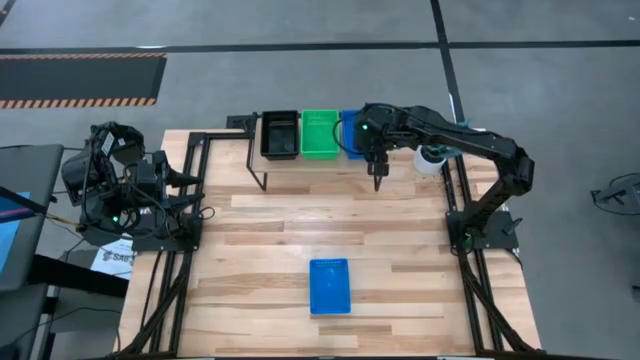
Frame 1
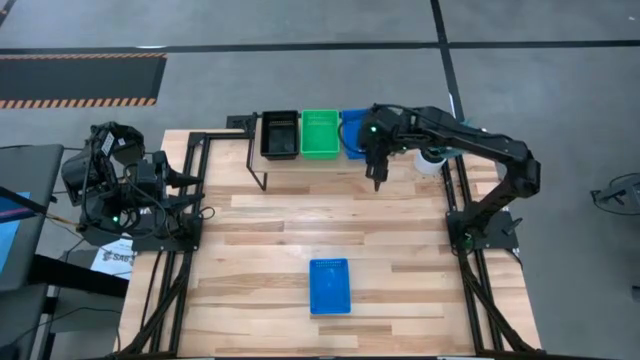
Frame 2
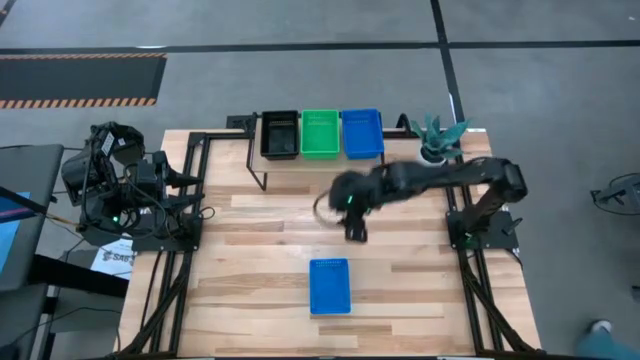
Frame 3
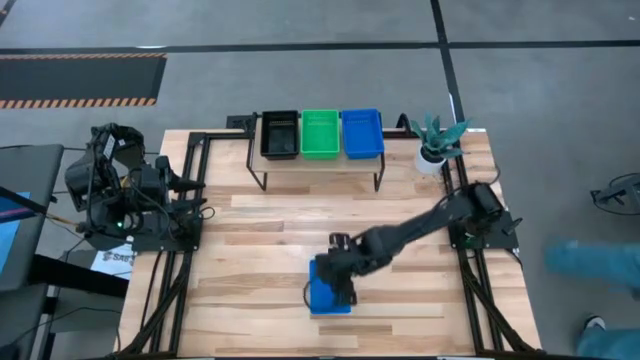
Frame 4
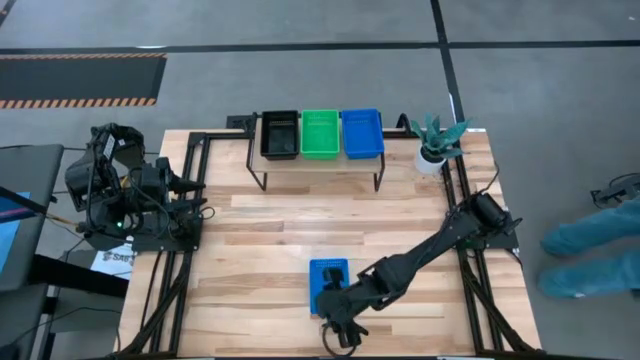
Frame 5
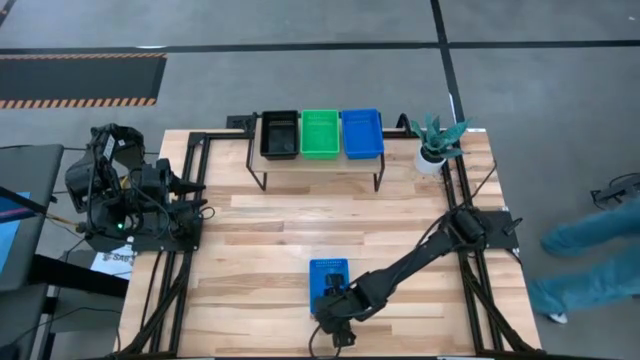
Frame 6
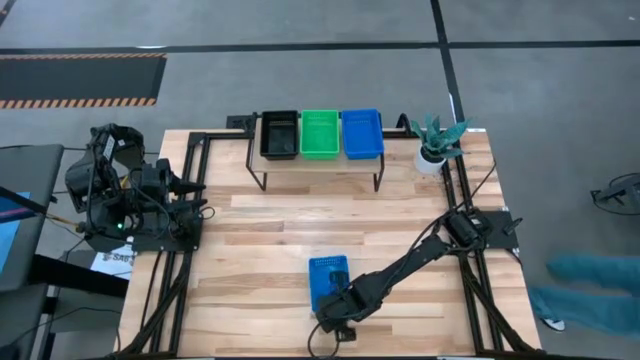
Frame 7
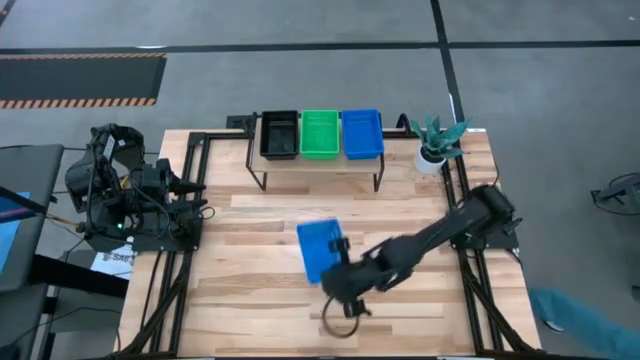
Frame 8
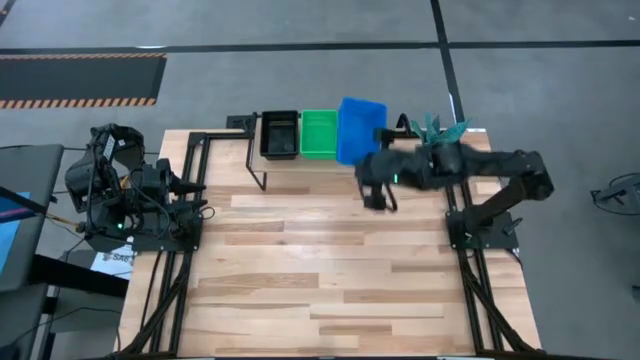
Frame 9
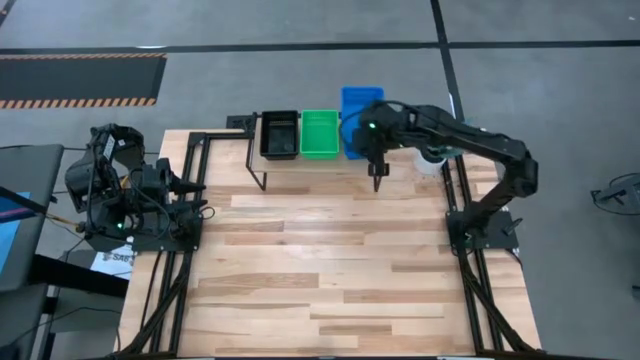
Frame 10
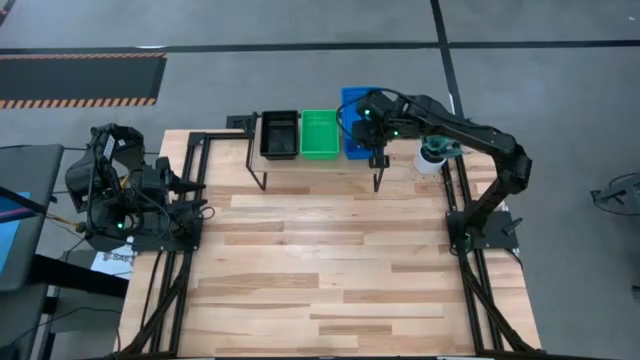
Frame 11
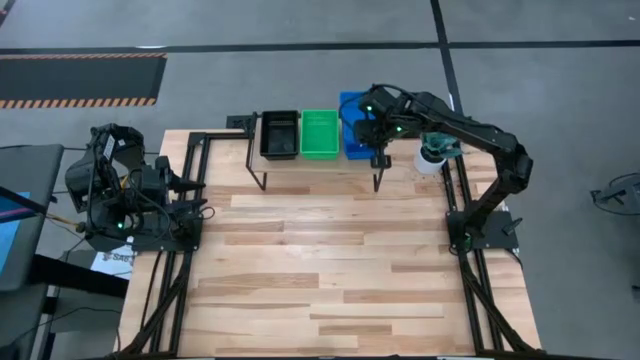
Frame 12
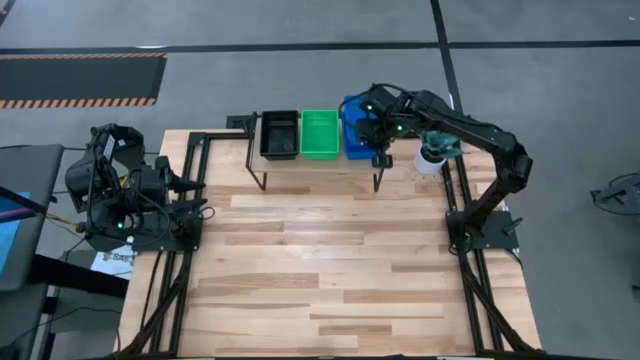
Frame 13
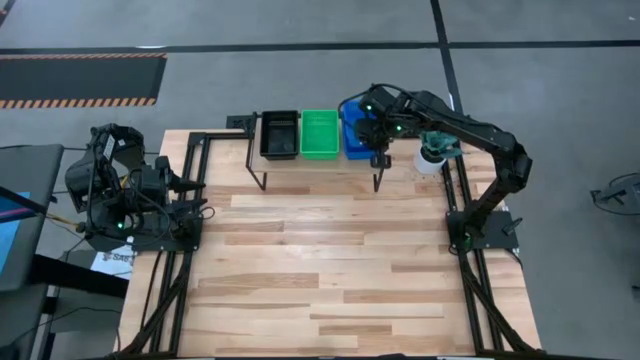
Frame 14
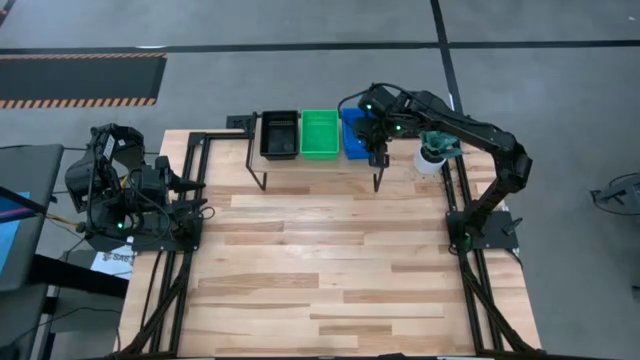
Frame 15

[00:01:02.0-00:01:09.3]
Task: Stack baskets on shelf by color
Stack the blue bin on the blue bin on the shelf

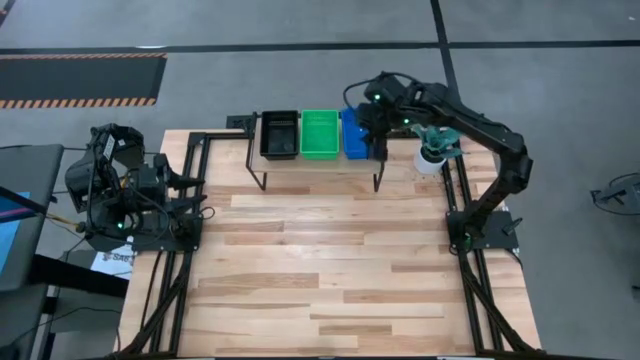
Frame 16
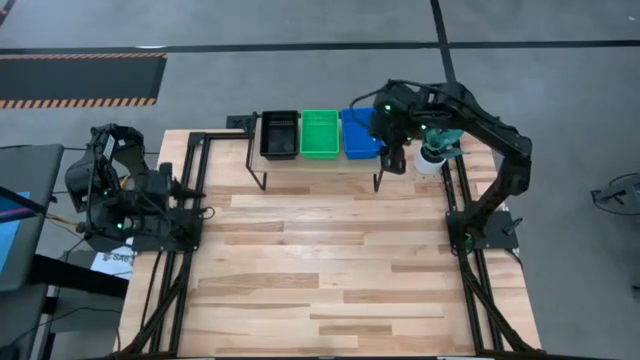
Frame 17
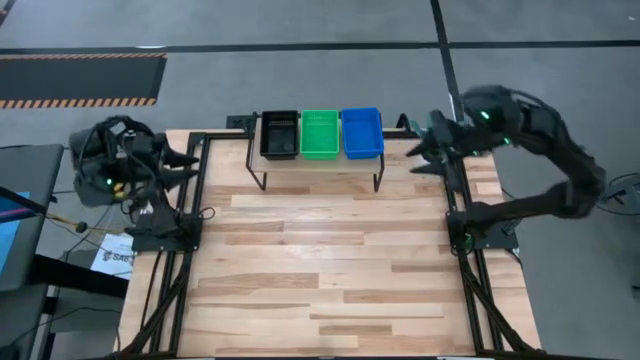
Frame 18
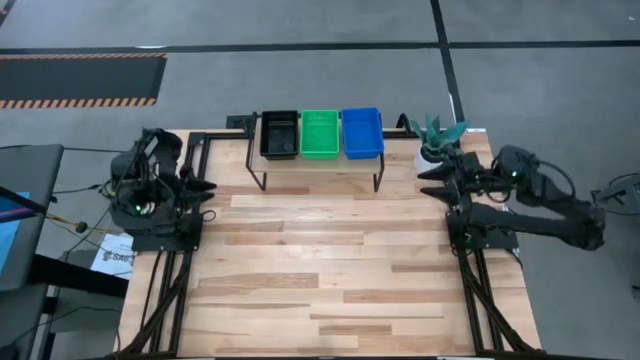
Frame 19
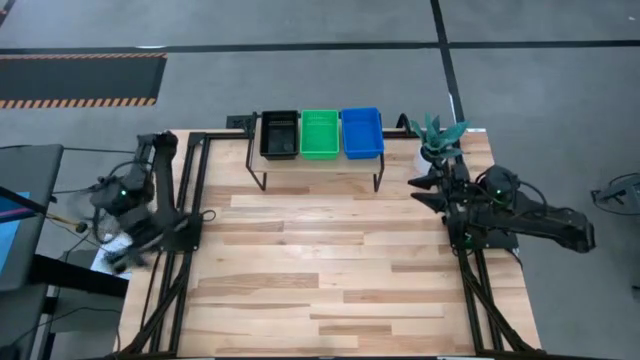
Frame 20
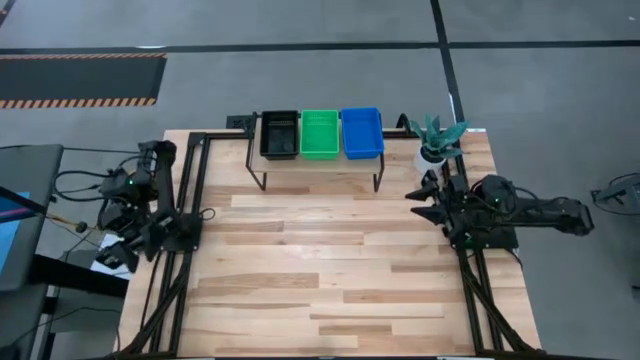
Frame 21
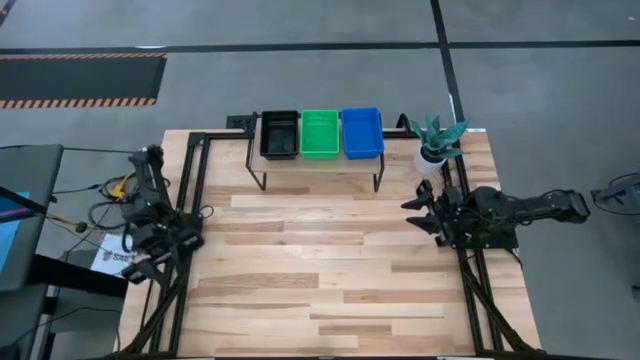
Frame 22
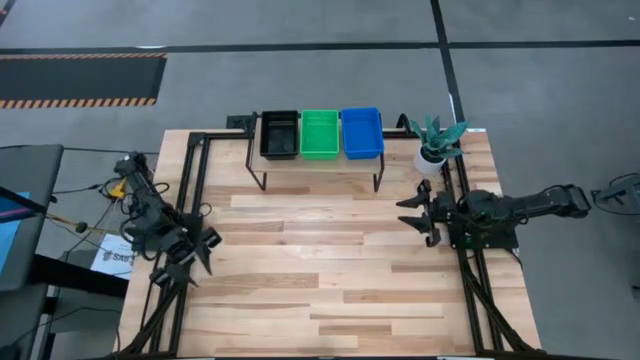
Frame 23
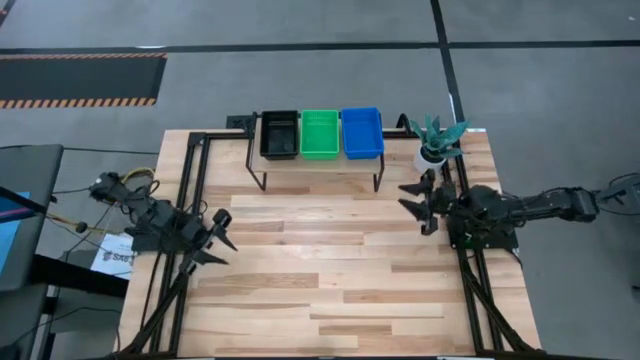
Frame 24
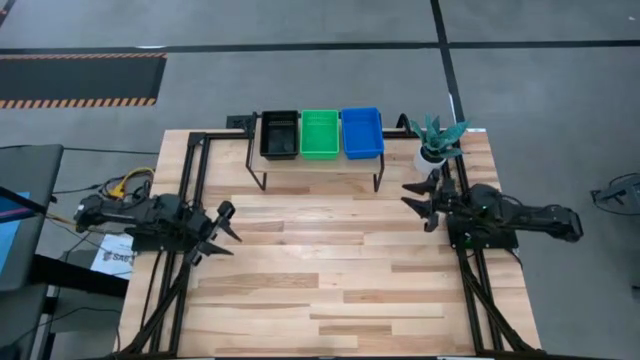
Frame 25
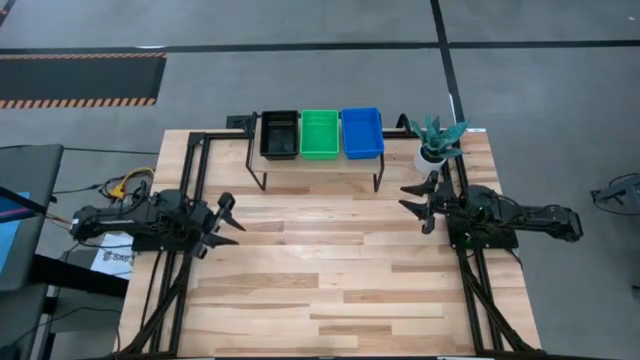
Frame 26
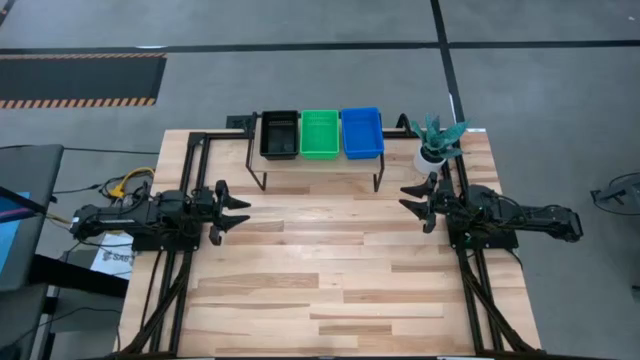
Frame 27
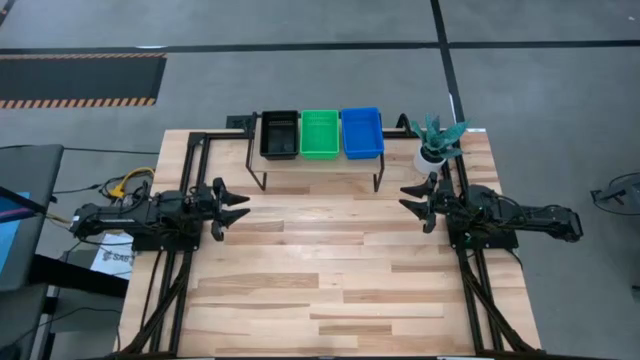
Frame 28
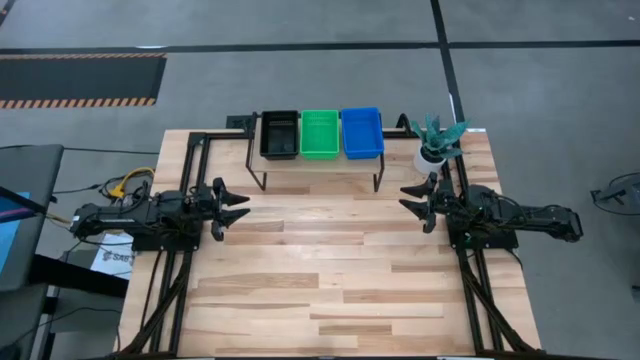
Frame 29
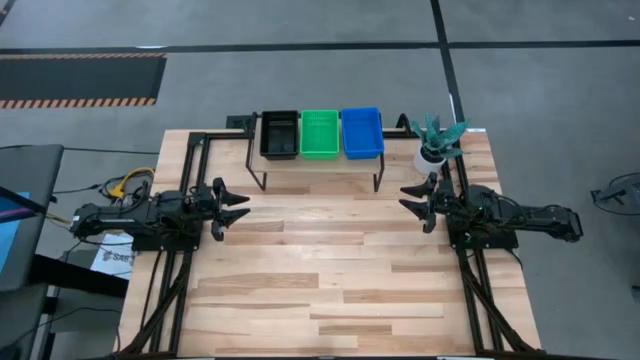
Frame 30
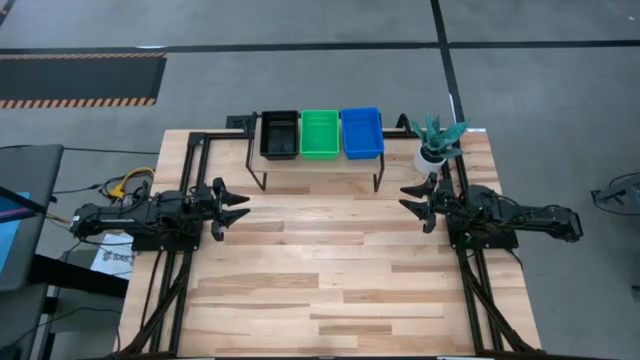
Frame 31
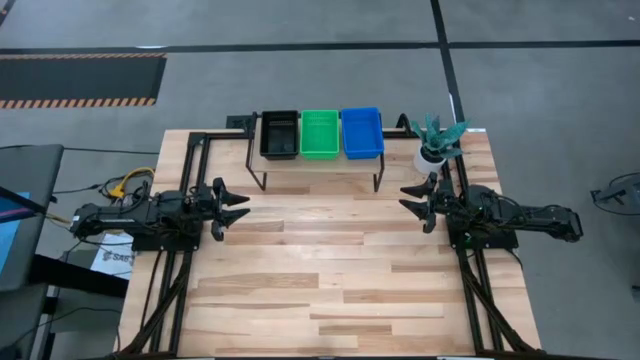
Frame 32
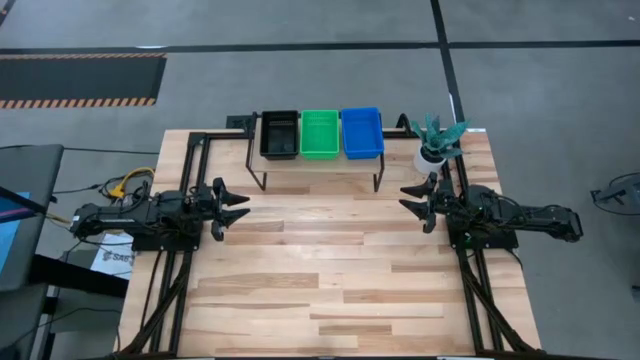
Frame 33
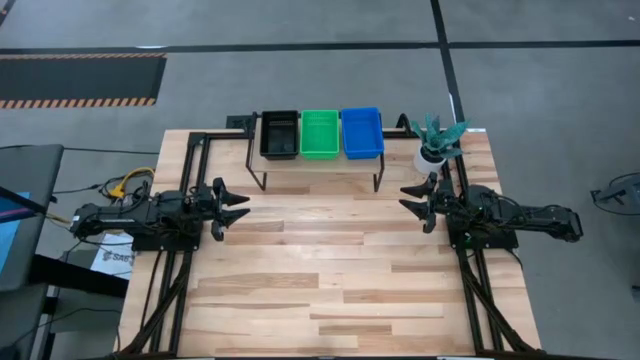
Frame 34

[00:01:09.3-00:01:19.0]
Return to Home Position

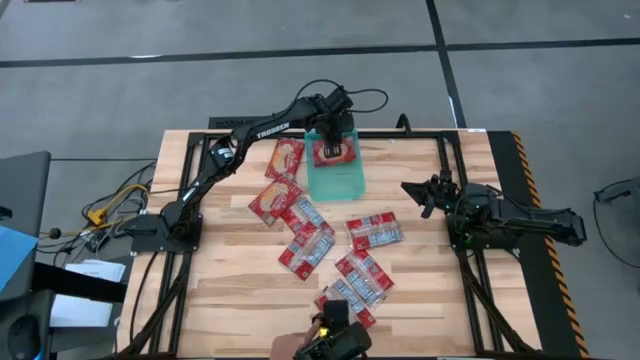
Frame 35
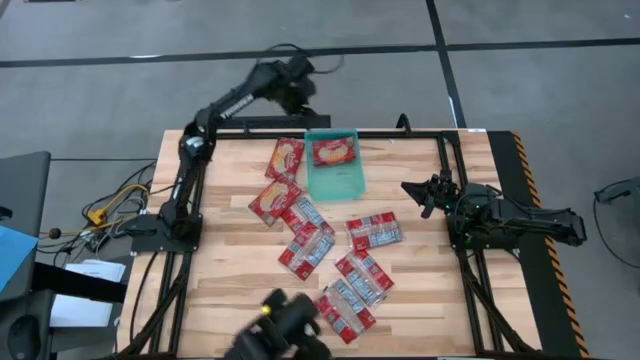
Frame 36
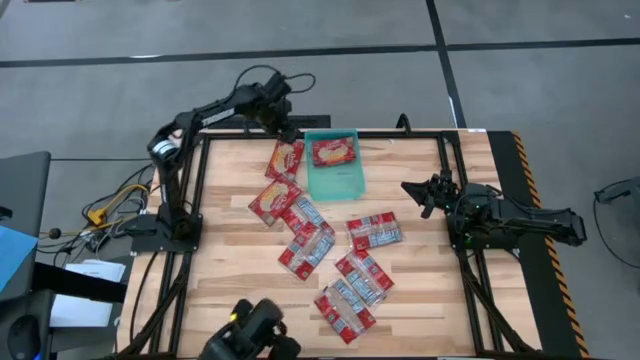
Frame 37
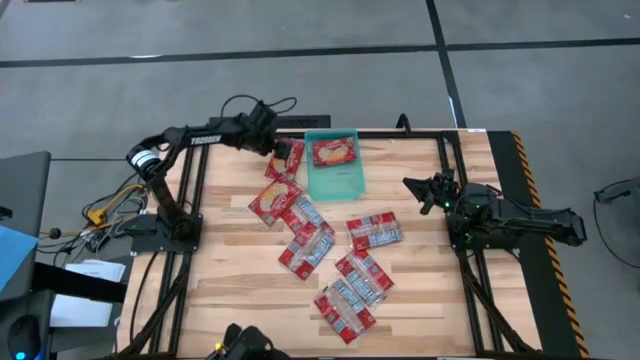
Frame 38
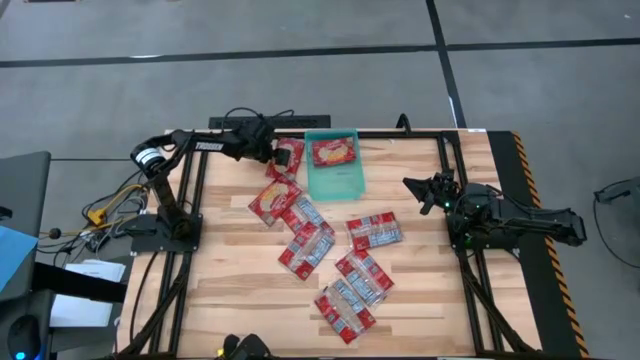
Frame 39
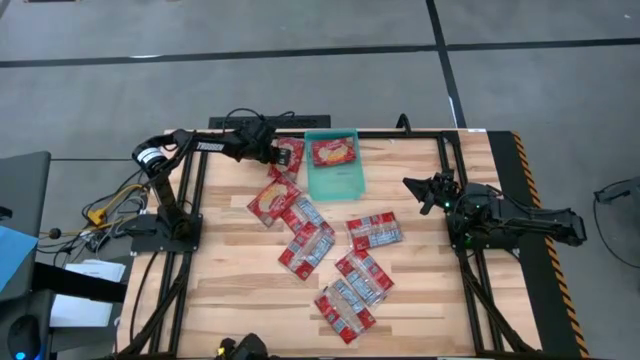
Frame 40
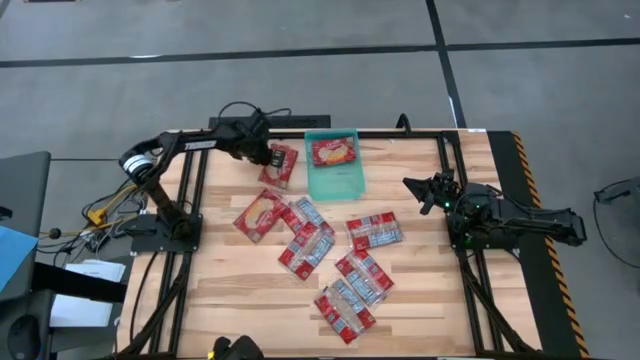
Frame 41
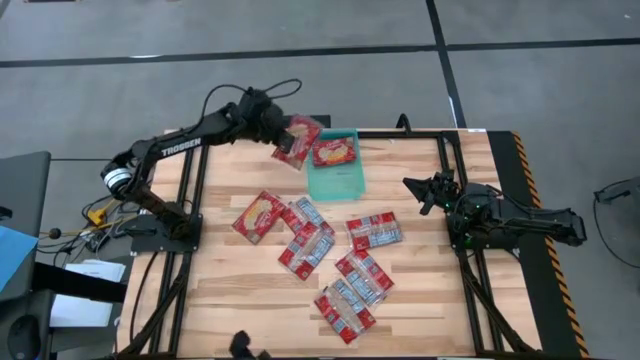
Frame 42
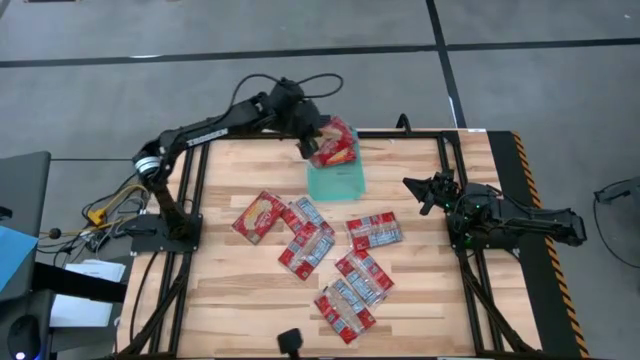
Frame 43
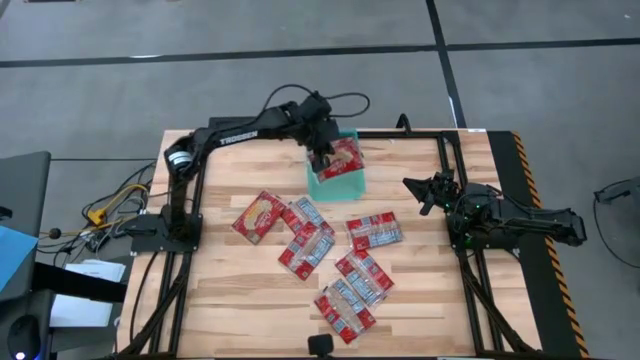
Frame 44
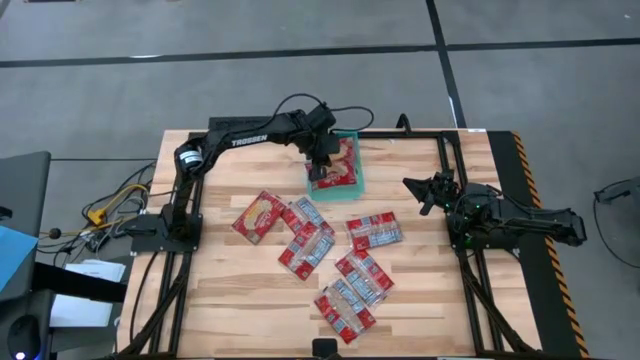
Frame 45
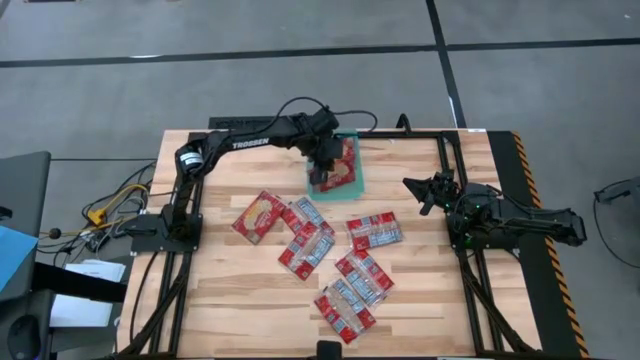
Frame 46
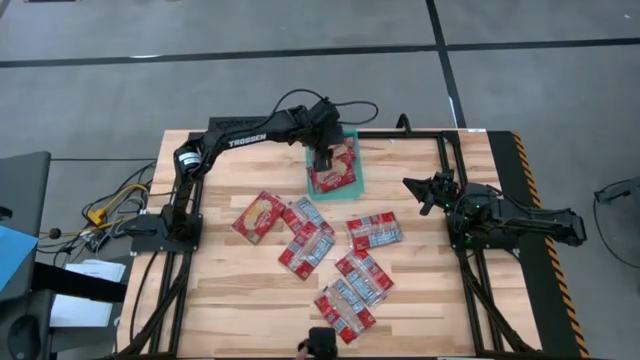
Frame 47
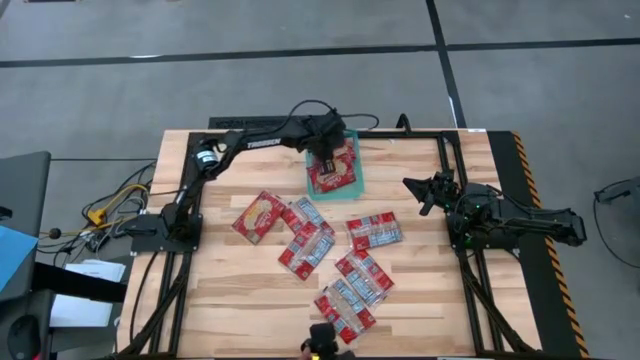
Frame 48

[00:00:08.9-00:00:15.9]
Task: Sort popcorn bags into baskets
Put the red popcorn bag into the green bin
